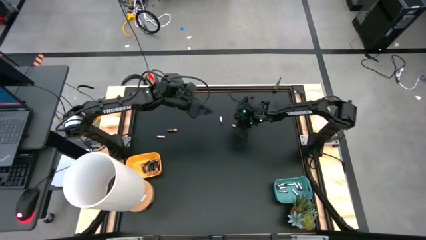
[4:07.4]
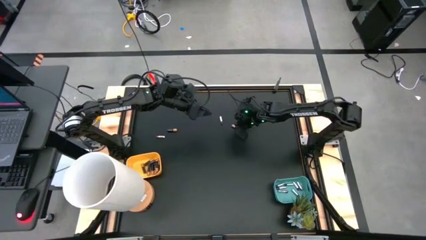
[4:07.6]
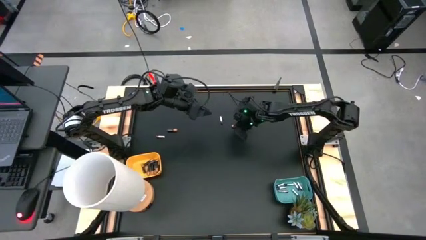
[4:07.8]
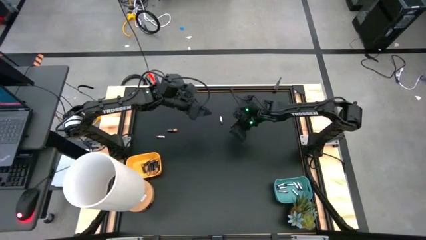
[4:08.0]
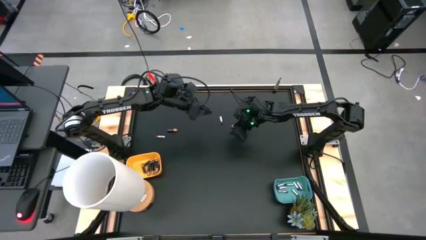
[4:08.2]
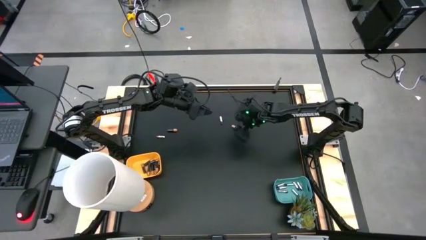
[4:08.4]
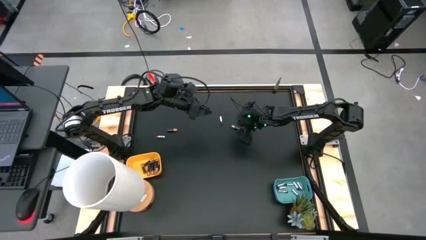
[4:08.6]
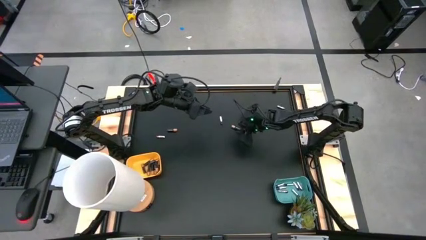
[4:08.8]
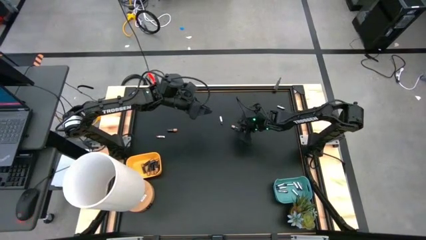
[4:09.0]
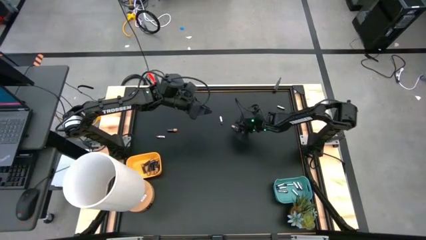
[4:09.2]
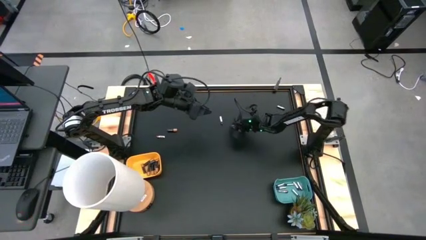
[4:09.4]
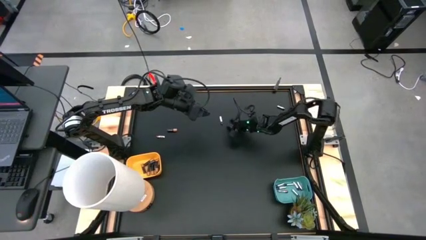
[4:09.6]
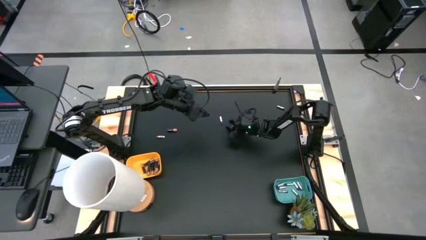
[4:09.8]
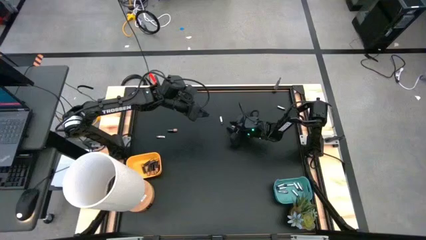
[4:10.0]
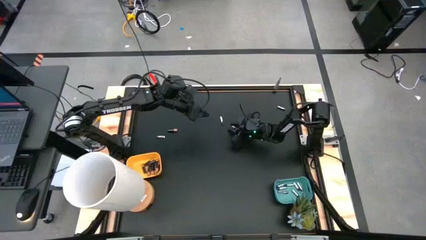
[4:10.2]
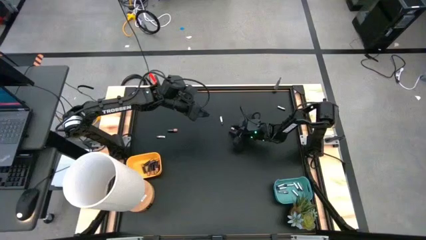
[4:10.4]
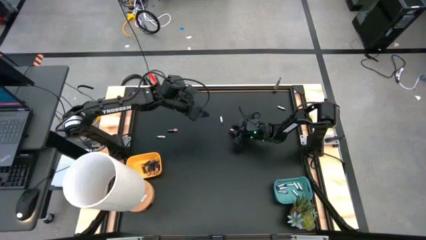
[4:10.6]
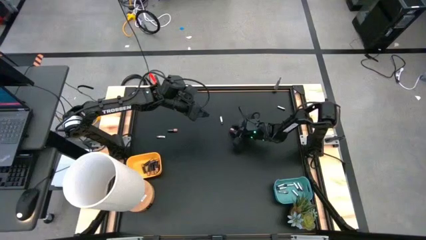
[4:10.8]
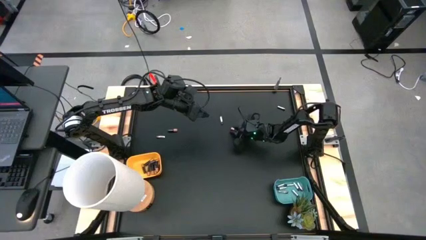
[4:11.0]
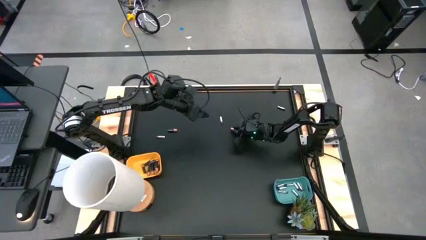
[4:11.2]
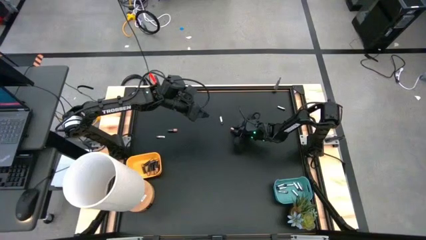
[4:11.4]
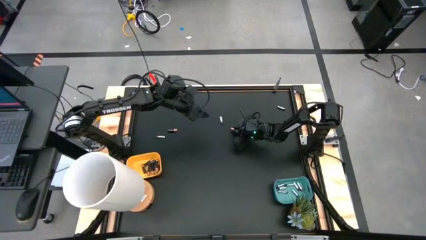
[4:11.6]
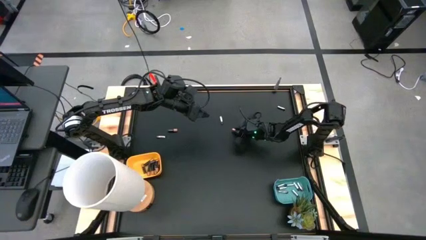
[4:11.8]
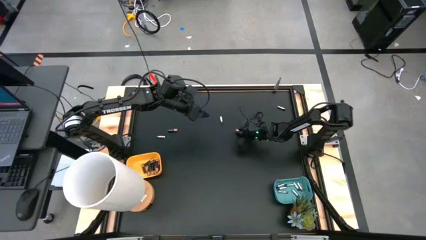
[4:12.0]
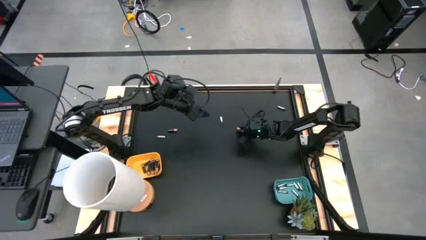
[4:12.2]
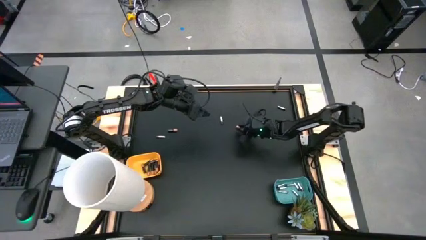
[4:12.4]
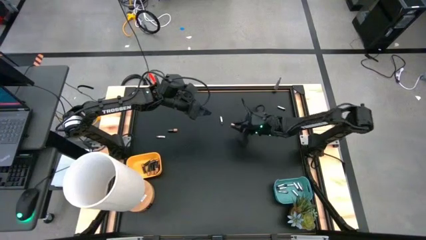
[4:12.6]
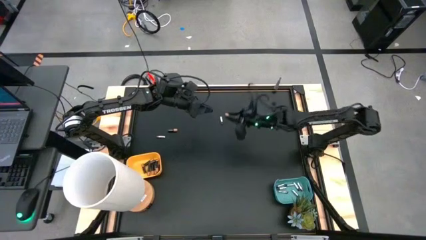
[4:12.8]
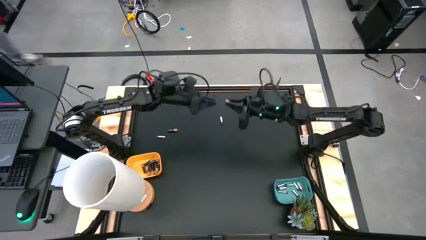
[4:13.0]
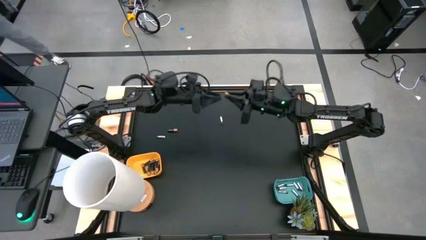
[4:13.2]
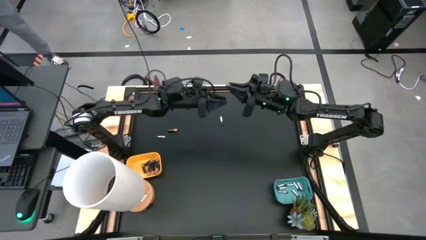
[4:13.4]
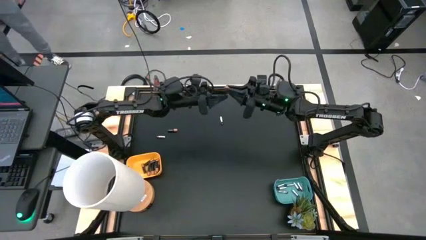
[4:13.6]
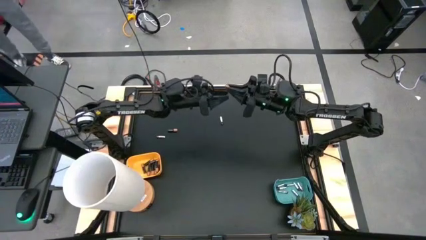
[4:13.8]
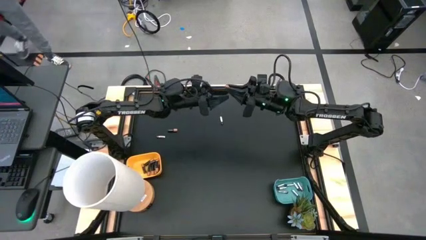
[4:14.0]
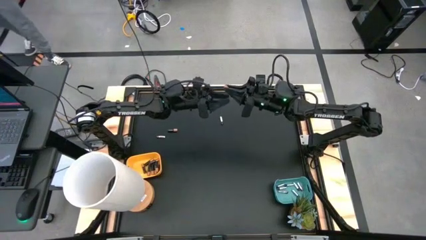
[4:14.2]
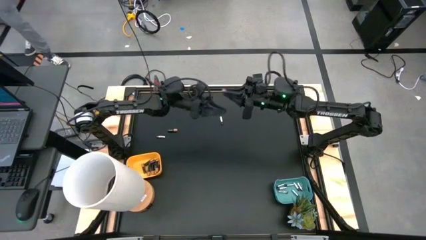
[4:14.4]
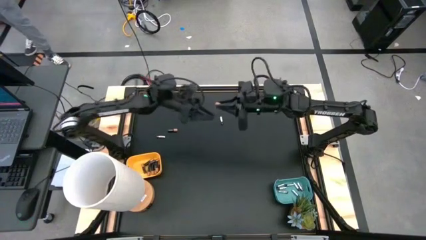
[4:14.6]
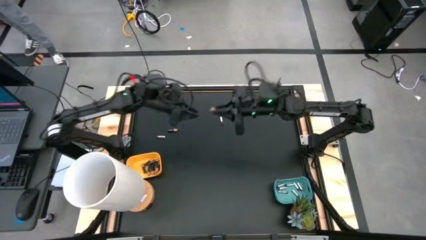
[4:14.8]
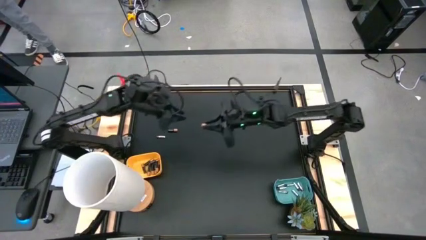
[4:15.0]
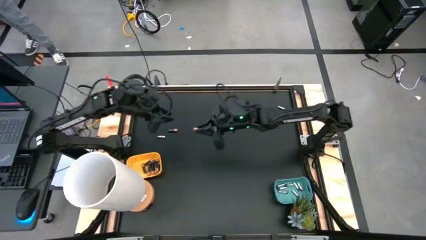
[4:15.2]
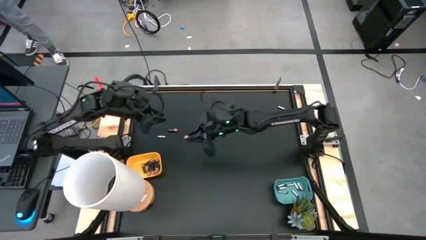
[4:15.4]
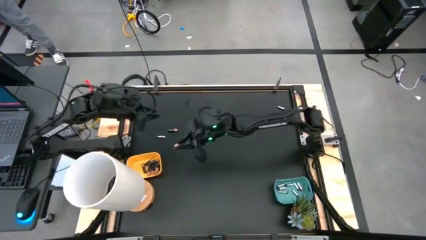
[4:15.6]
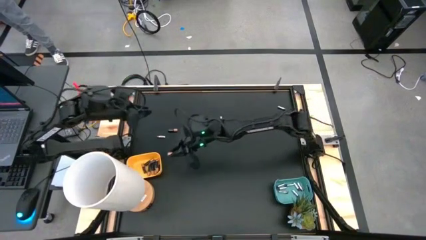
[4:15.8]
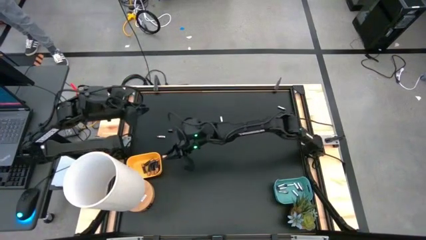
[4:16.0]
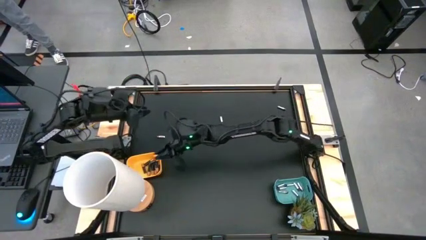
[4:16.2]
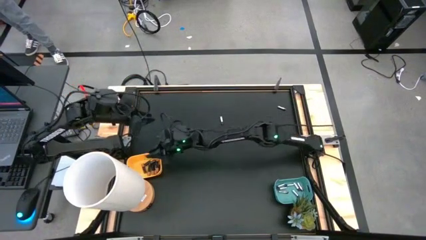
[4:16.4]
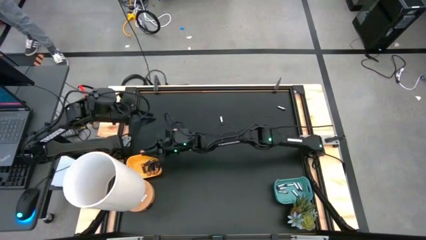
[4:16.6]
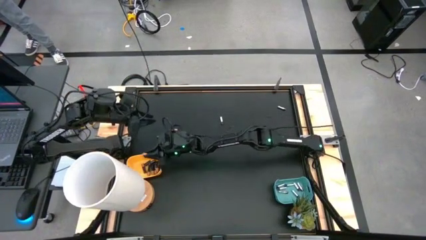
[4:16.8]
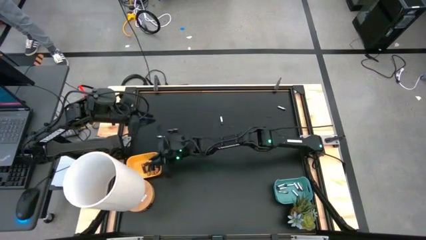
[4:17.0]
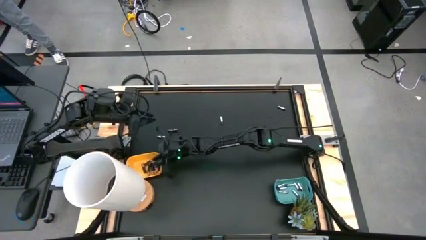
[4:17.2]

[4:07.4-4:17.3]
Task: Sort batteries
Put the black battery into the yellow bin

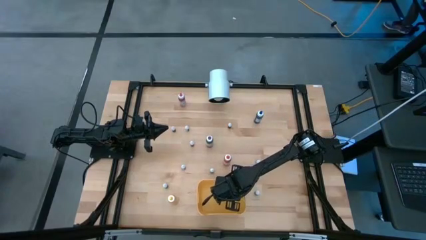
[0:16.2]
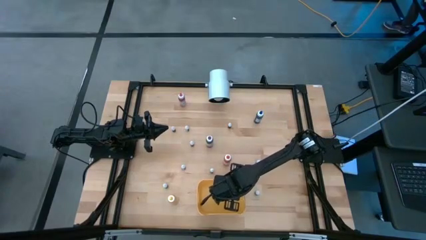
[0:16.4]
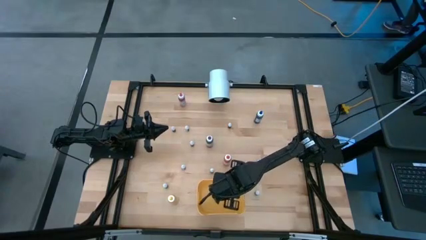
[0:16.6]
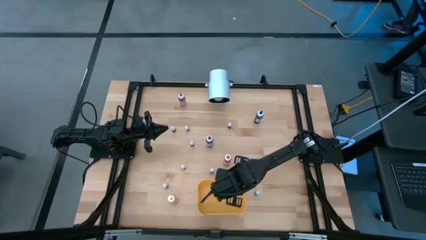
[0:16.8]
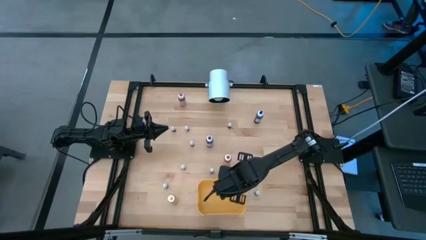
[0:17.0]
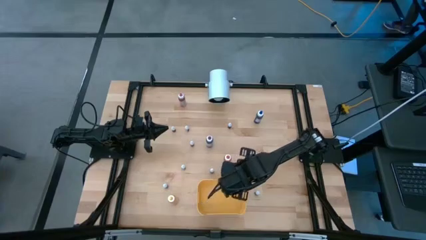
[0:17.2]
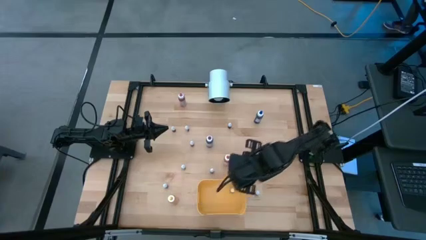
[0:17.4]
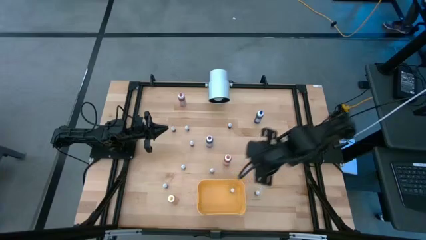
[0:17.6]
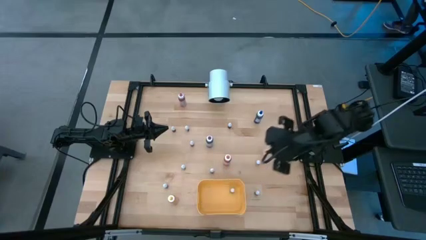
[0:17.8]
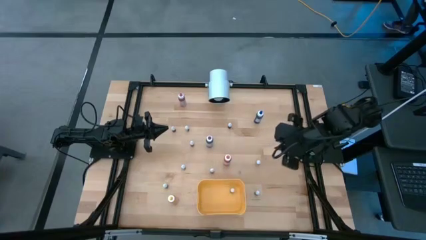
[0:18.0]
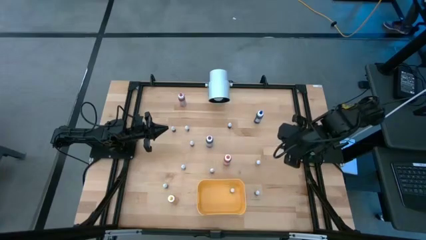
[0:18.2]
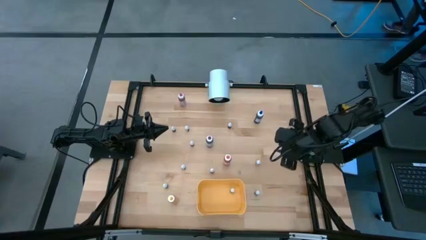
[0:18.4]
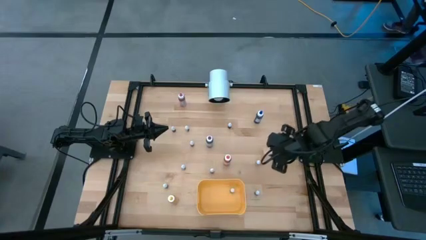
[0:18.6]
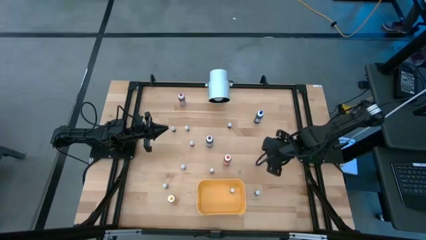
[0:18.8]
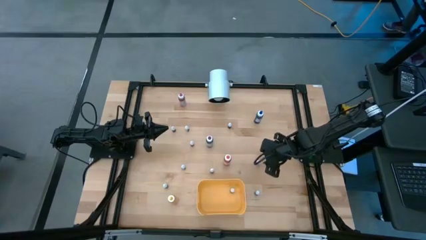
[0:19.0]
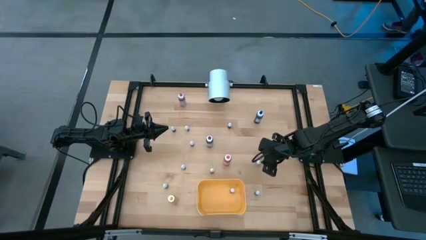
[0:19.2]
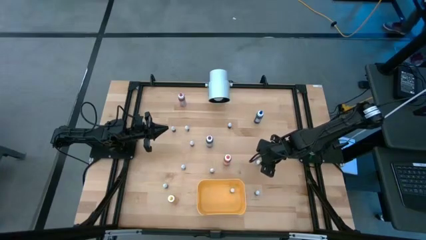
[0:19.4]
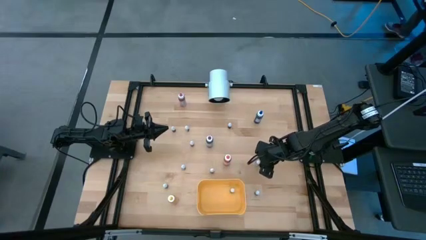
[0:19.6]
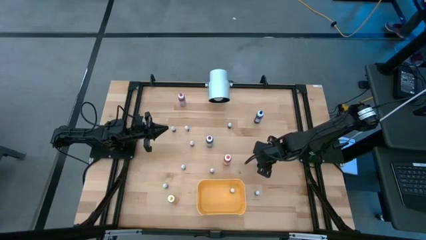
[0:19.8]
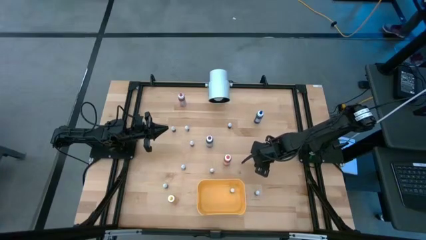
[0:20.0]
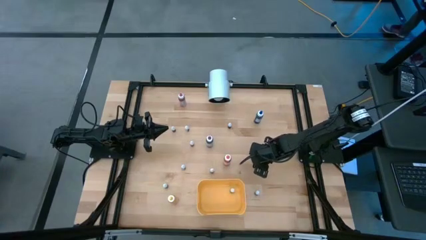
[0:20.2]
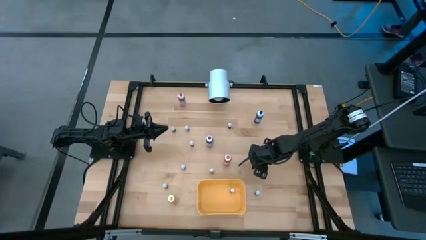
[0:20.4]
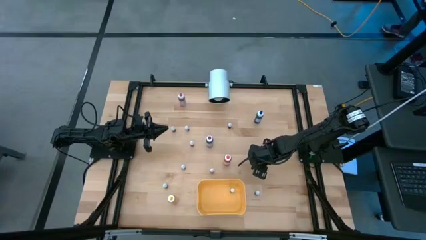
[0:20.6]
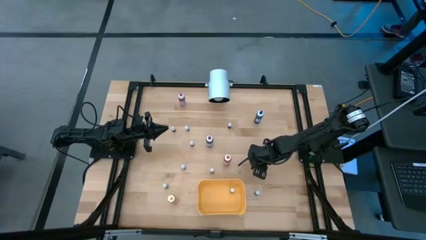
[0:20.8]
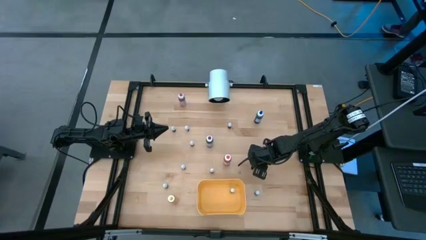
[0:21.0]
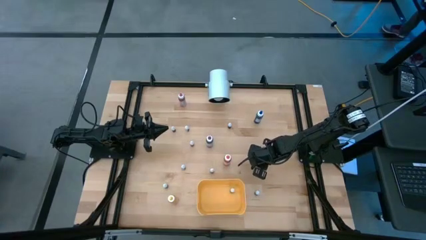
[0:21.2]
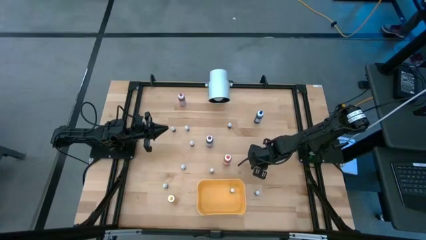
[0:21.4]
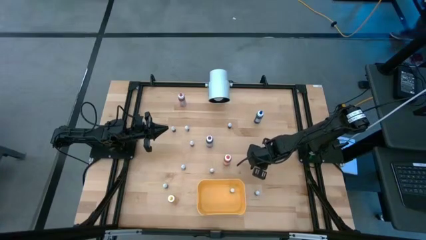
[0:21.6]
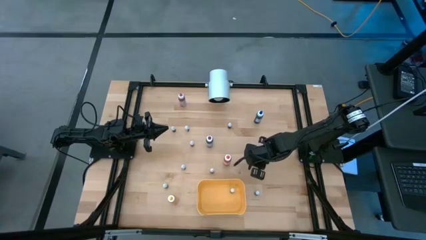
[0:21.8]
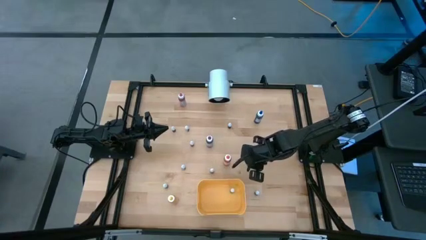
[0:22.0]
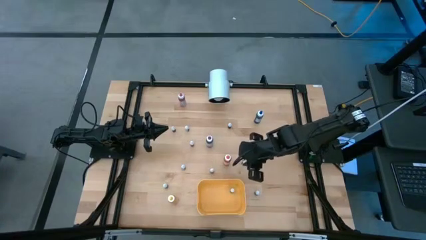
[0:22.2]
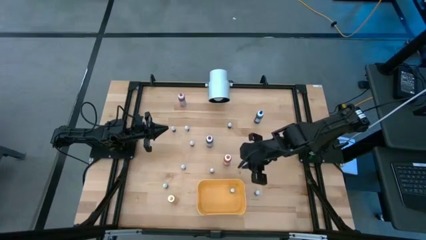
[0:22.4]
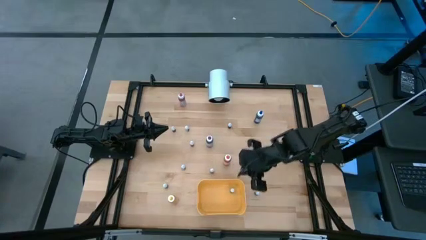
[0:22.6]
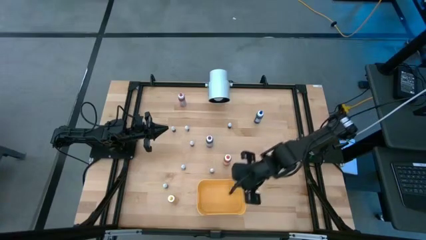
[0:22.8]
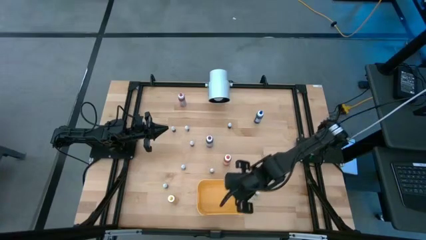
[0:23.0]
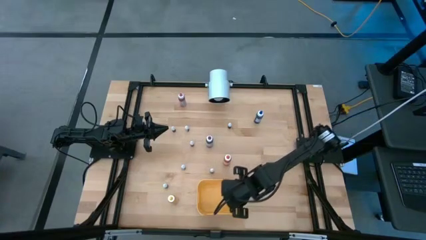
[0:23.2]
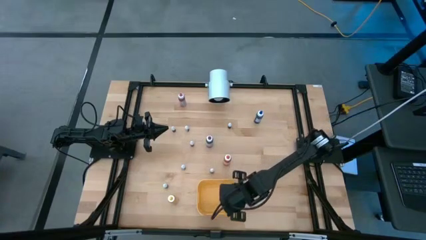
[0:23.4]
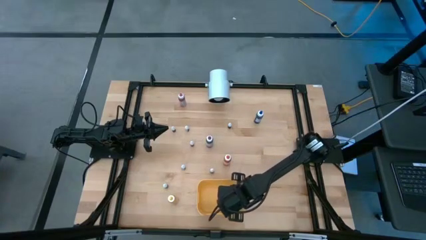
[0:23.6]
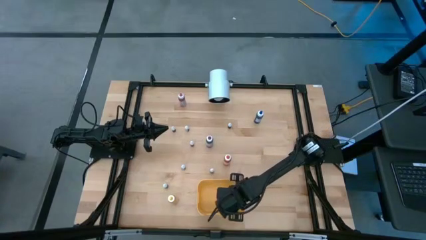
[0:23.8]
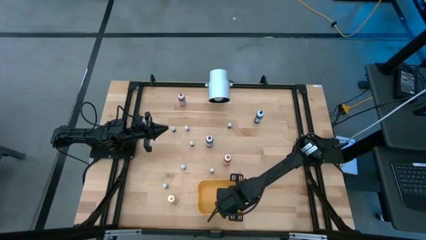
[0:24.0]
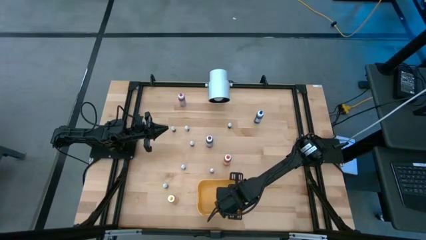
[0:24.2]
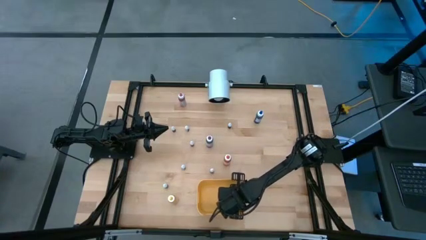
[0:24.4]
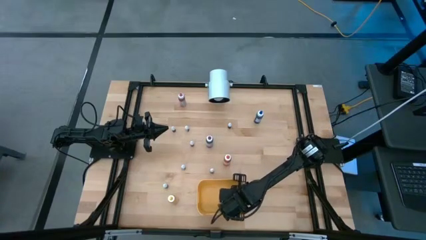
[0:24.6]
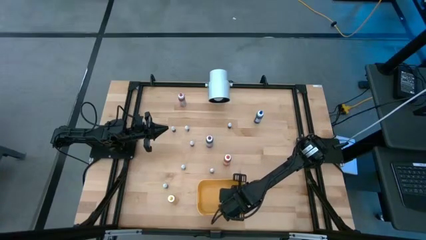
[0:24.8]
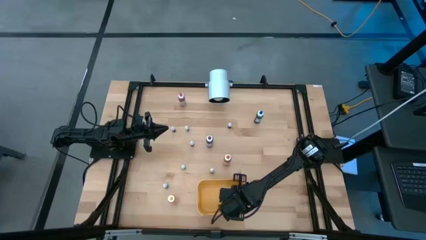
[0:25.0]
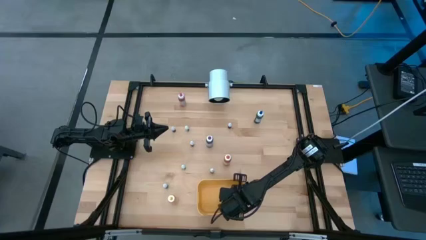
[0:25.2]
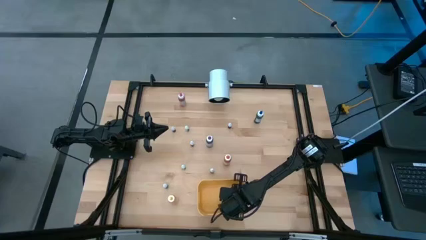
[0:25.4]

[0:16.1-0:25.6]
Task: Pick & Place food coloring
Put the small red food coloring bottle into the yellow container
